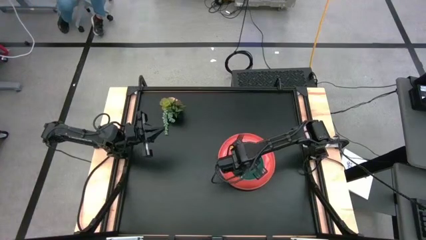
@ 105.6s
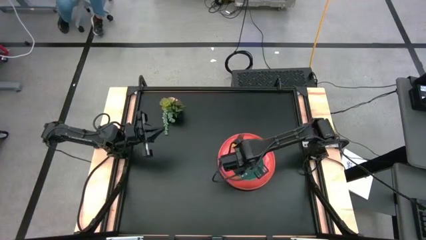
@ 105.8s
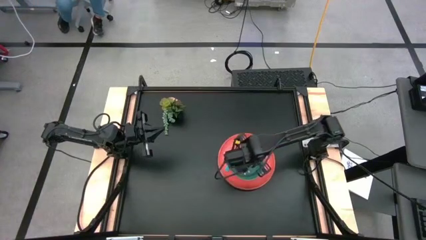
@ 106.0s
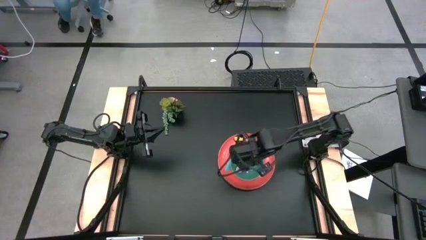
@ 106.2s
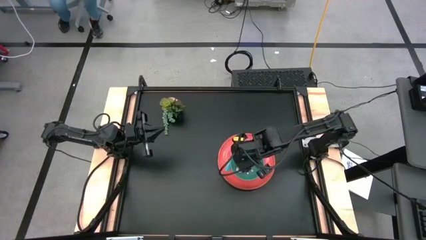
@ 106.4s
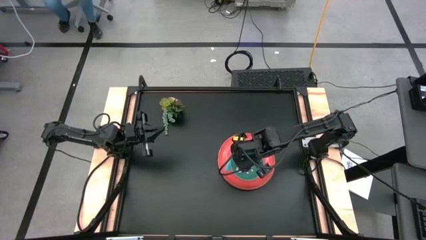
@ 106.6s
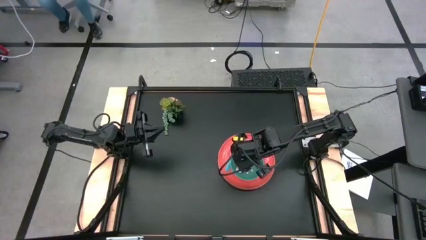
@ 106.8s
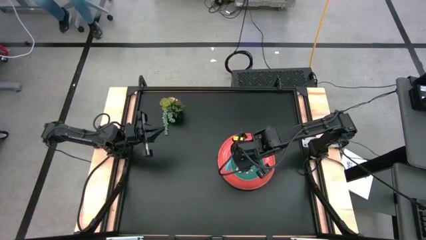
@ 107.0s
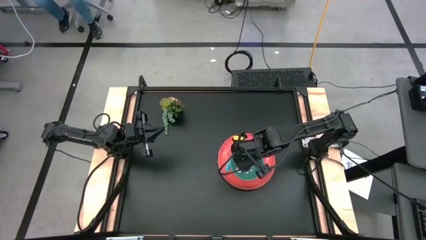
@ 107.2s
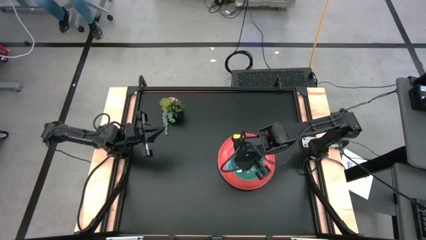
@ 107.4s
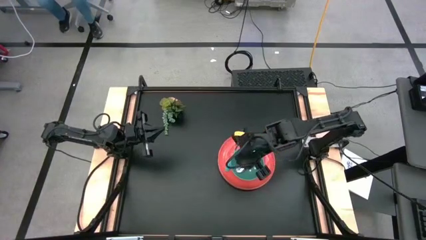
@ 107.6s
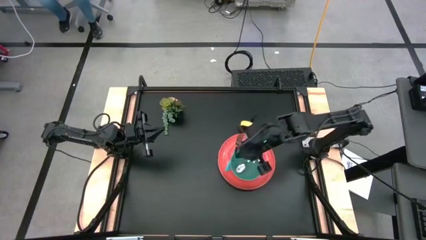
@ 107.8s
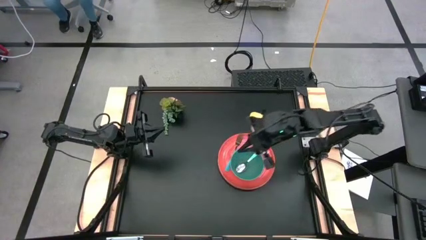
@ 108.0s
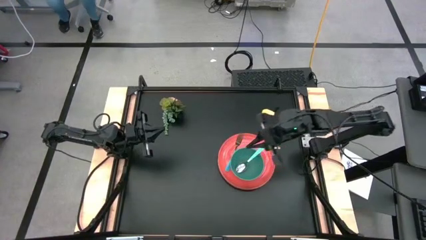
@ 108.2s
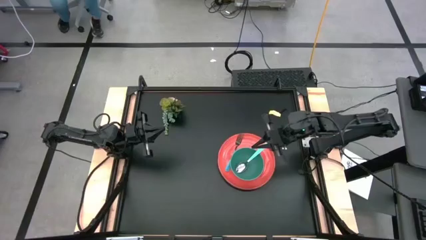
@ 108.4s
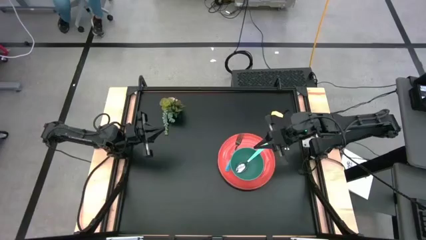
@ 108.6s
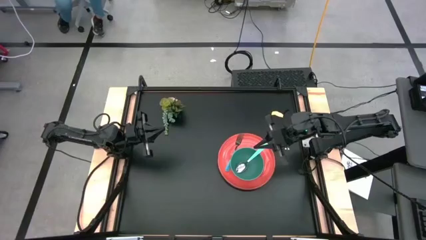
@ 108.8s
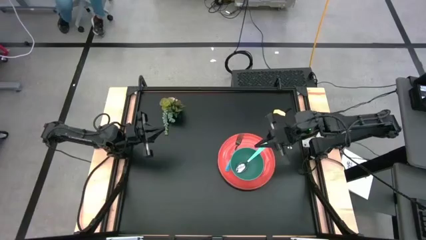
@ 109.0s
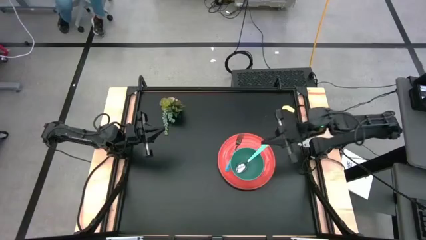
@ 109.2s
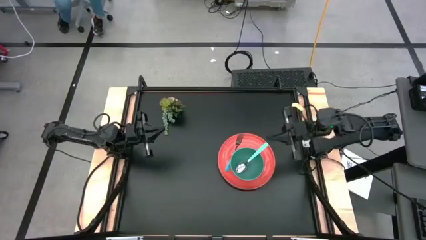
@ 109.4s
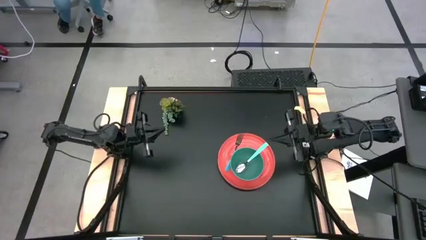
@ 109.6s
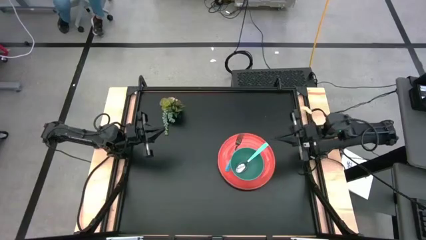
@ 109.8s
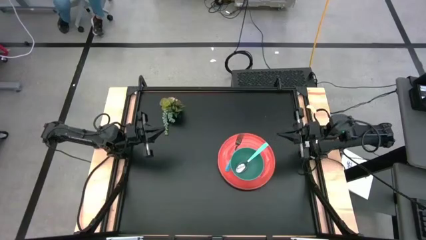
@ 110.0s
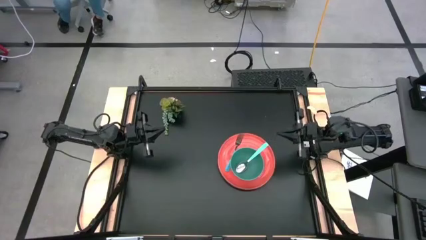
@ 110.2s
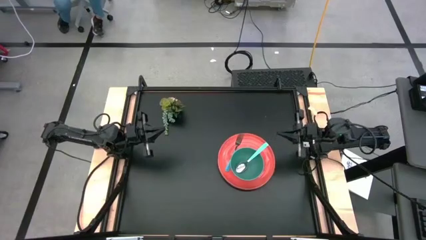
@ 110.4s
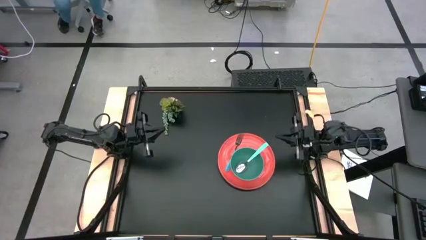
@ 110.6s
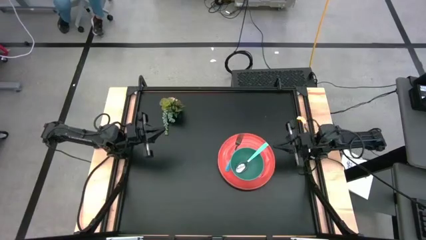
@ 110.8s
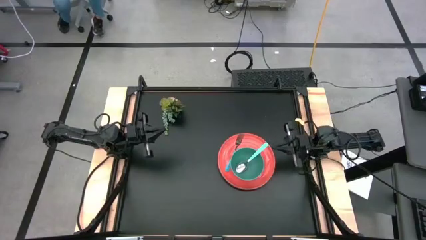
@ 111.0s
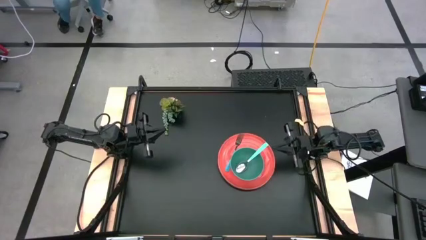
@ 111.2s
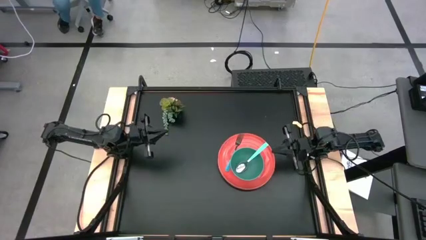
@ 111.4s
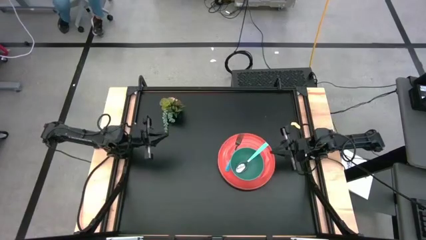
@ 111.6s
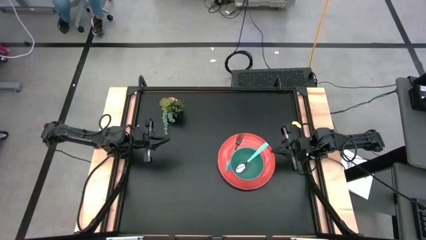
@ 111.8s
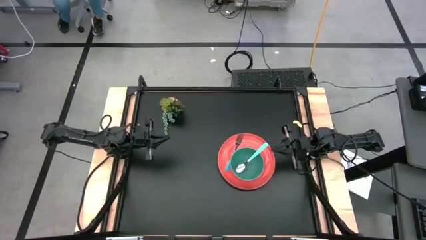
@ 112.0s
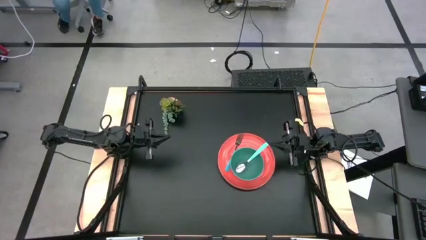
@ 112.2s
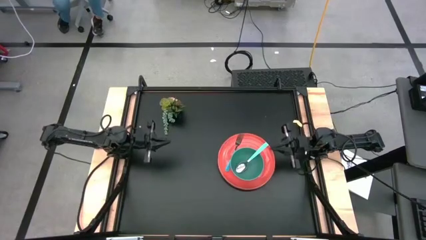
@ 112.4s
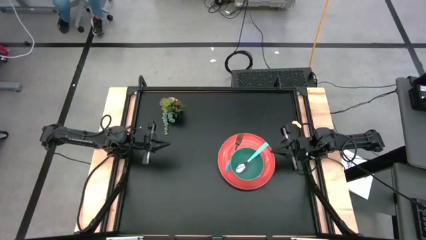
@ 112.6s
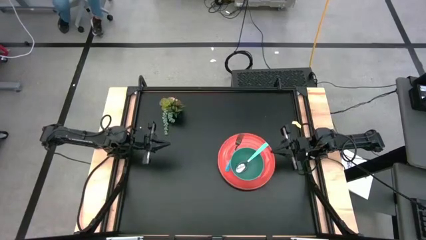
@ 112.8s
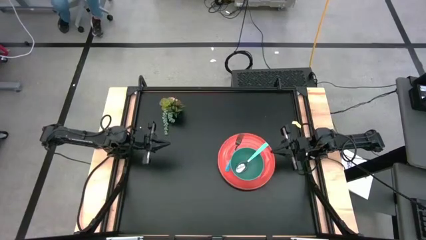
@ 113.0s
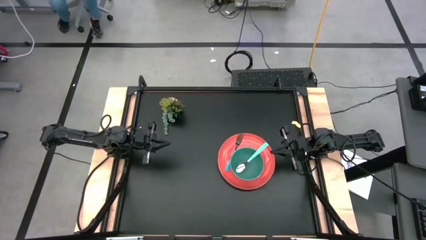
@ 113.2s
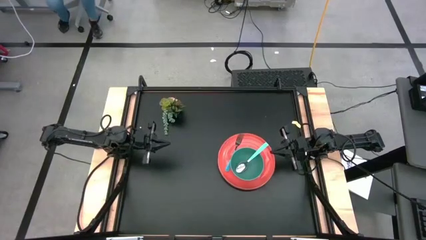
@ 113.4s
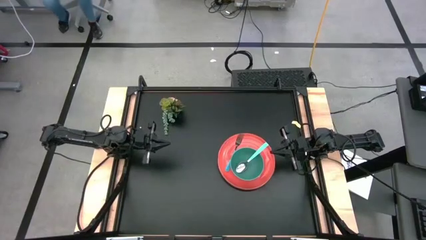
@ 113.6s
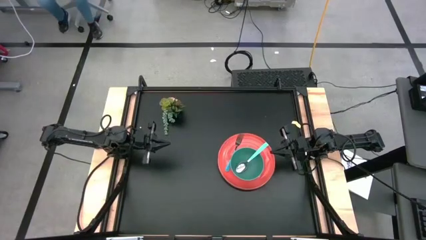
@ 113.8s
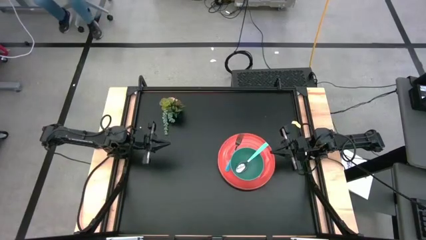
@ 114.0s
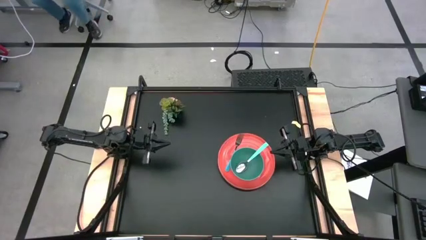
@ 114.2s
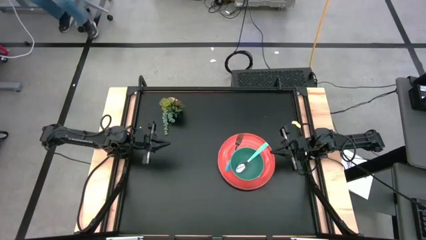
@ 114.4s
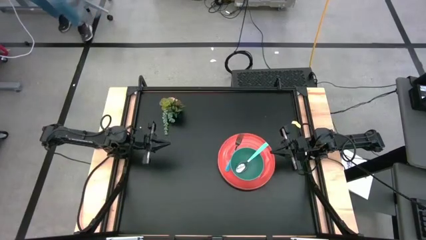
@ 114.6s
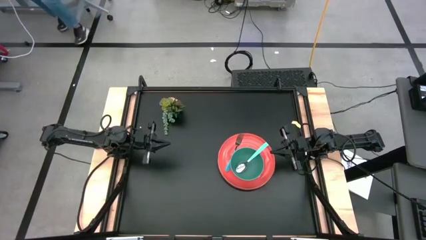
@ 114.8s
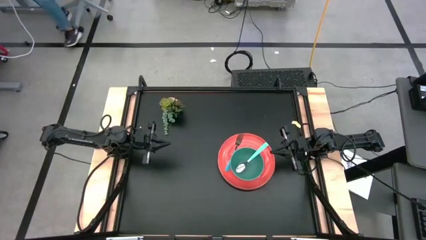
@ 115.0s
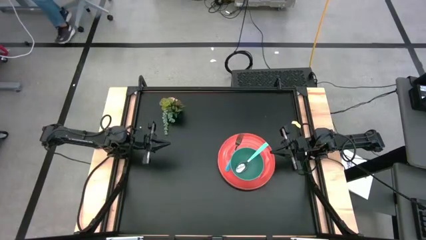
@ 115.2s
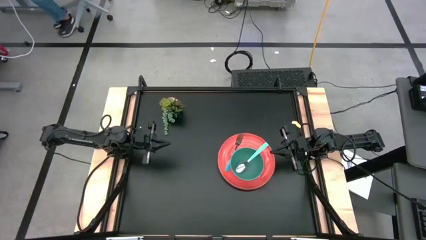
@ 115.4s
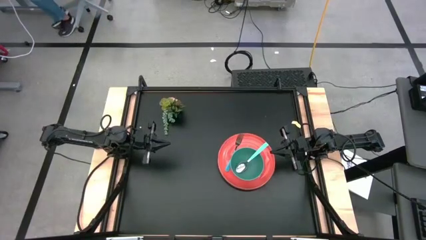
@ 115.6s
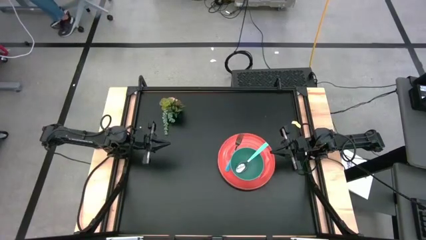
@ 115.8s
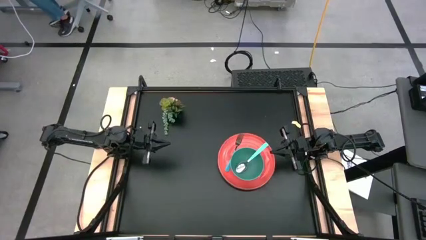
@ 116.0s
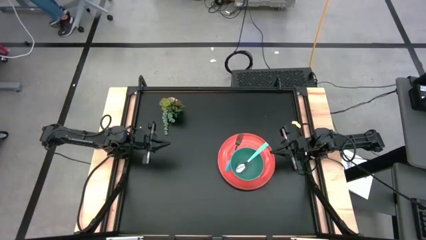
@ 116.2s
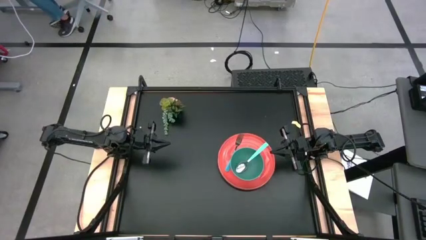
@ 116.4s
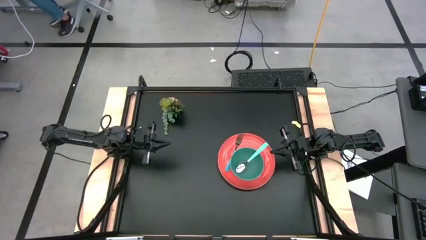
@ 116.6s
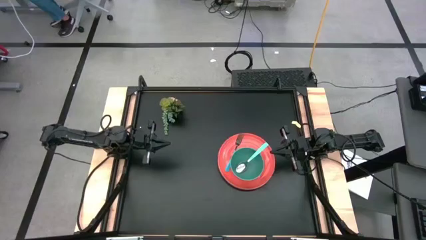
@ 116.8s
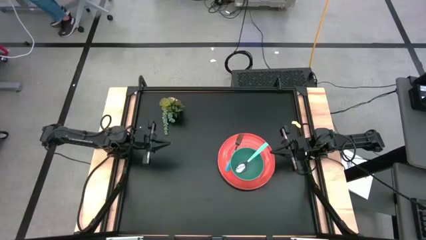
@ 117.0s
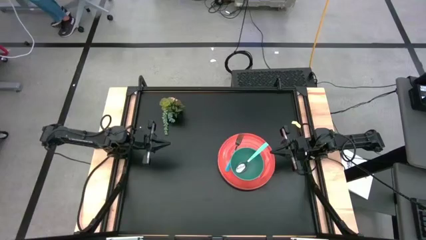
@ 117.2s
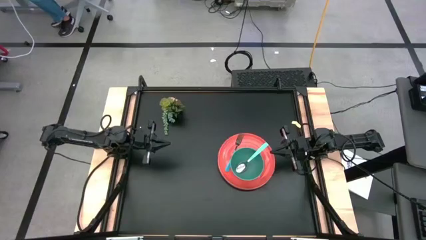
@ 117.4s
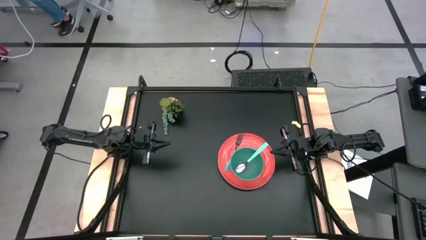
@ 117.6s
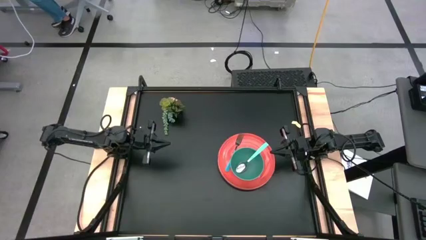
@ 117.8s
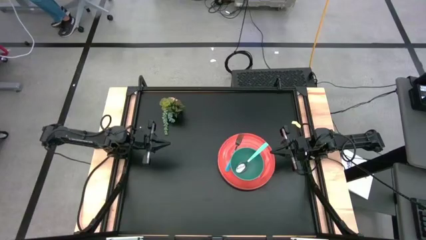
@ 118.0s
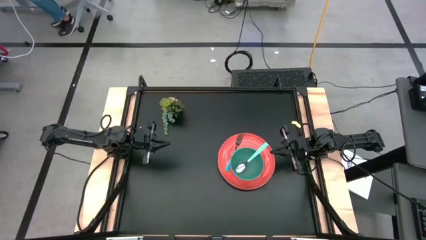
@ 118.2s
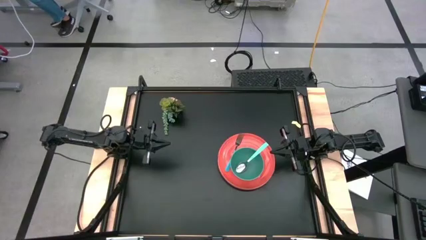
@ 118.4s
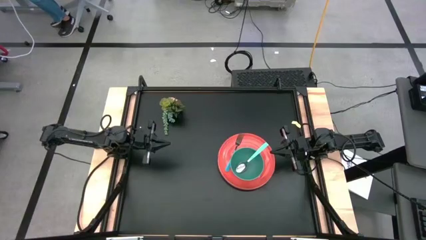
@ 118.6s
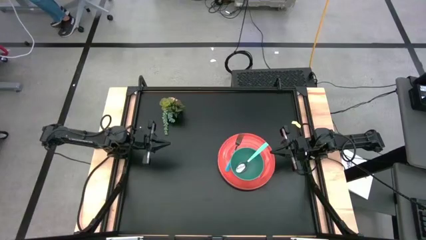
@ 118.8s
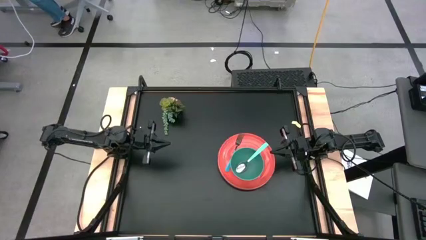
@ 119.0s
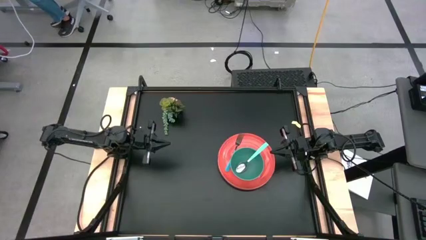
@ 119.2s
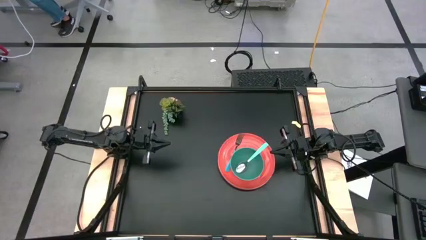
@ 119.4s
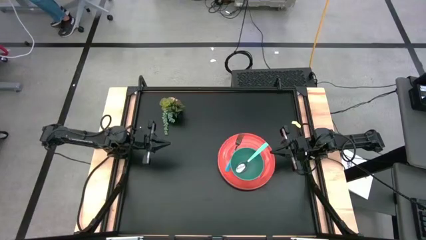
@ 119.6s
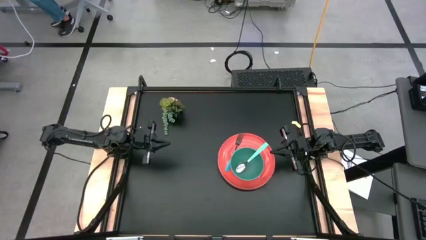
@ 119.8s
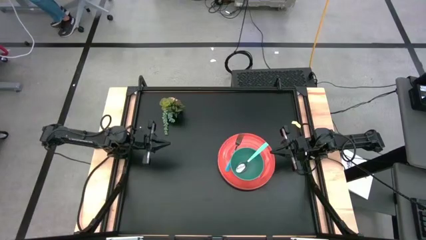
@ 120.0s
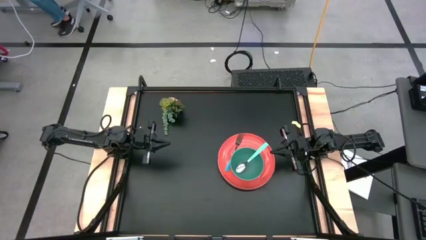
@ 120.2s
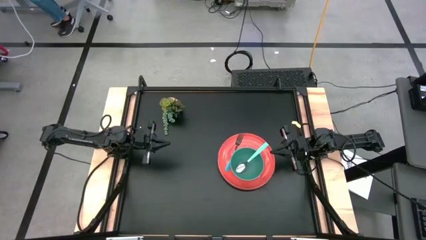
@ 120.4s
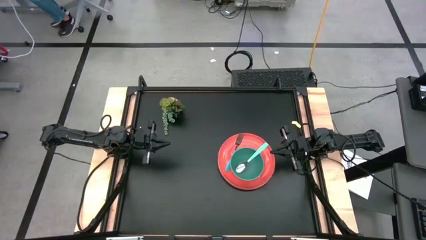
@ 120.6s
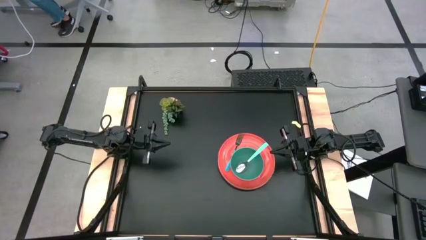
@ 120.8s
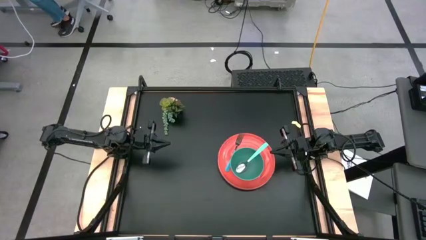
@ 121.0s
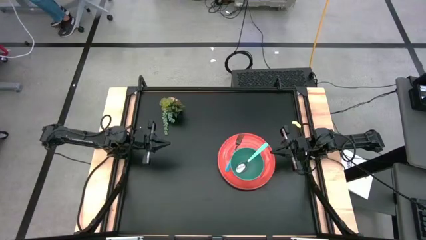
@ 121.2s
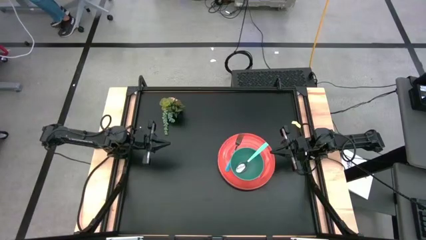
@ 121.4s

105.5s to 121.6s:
Task: Set table place
Return to Home Position
